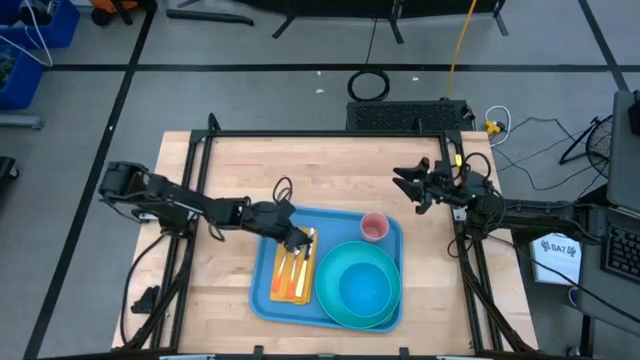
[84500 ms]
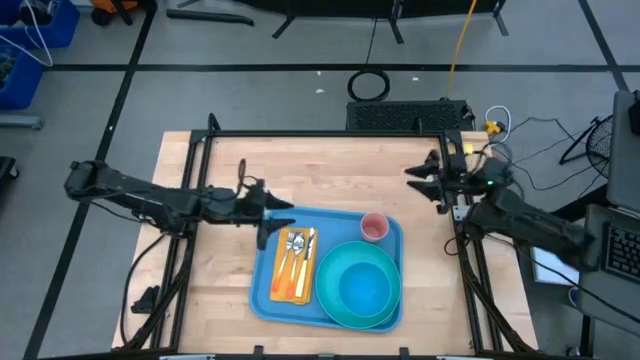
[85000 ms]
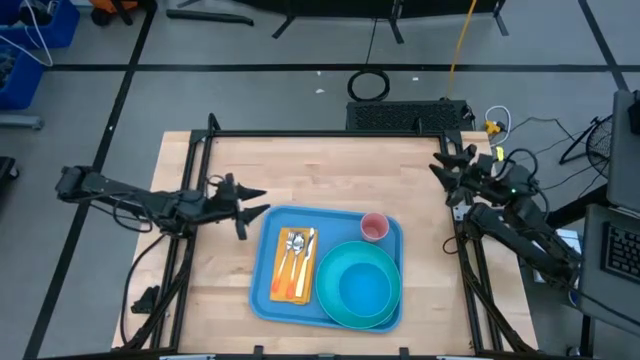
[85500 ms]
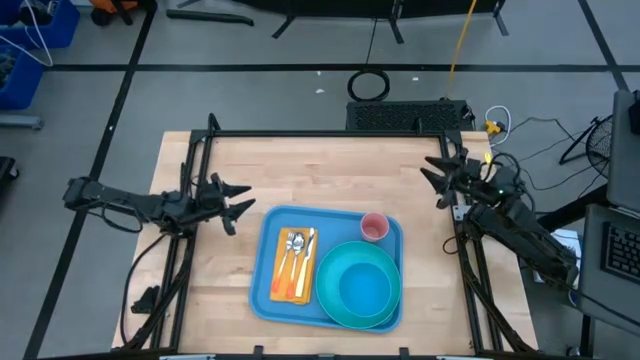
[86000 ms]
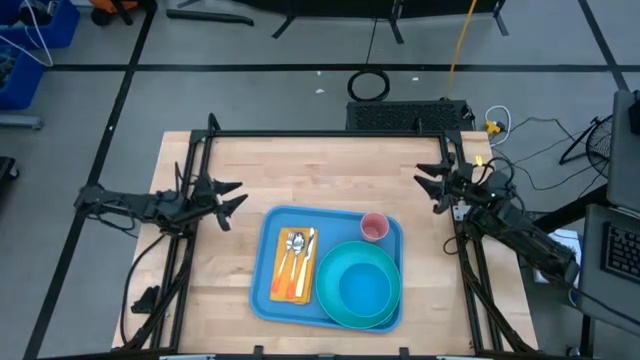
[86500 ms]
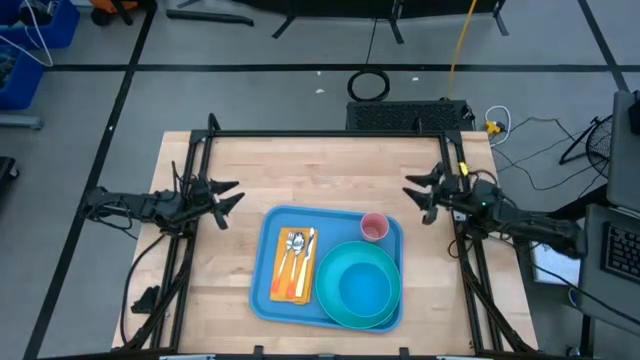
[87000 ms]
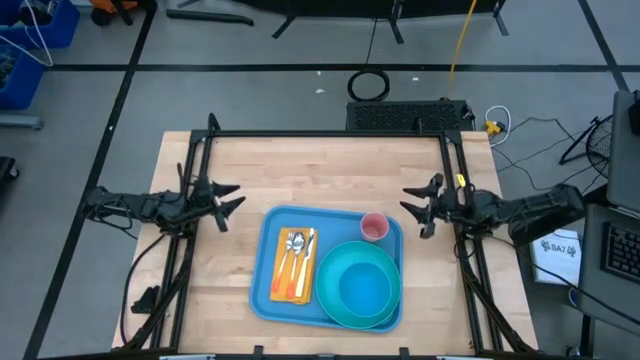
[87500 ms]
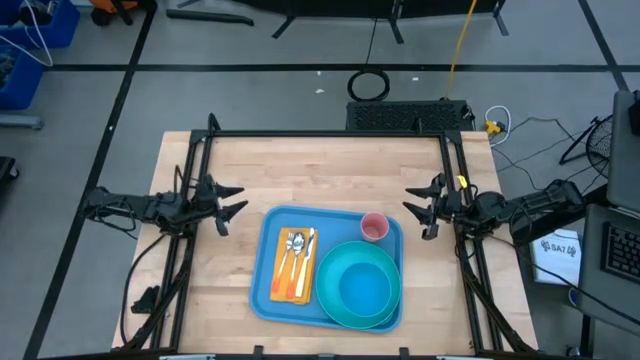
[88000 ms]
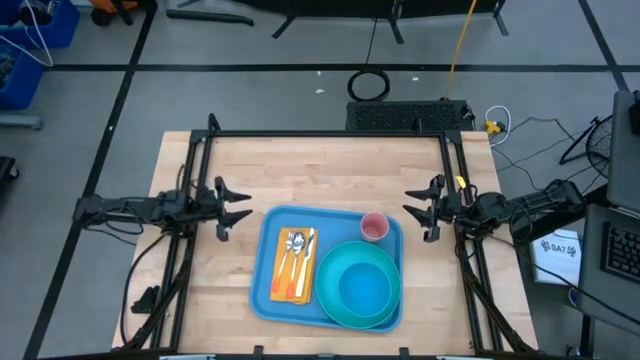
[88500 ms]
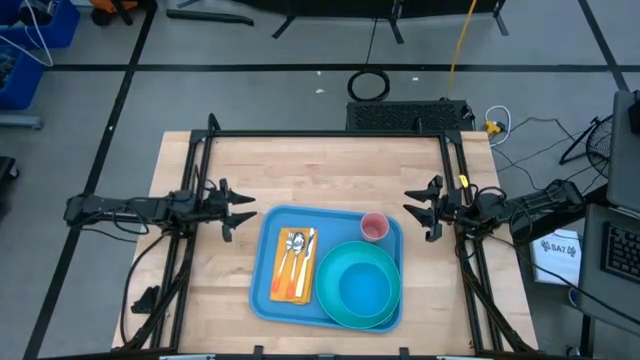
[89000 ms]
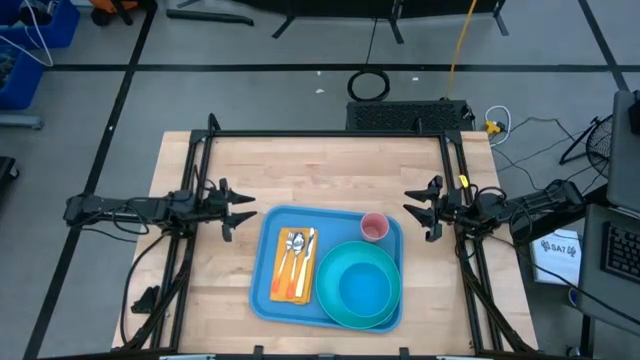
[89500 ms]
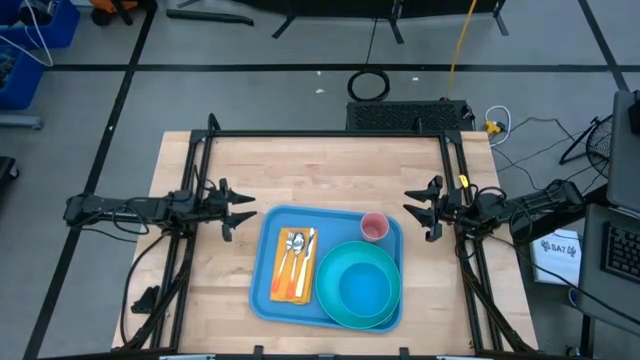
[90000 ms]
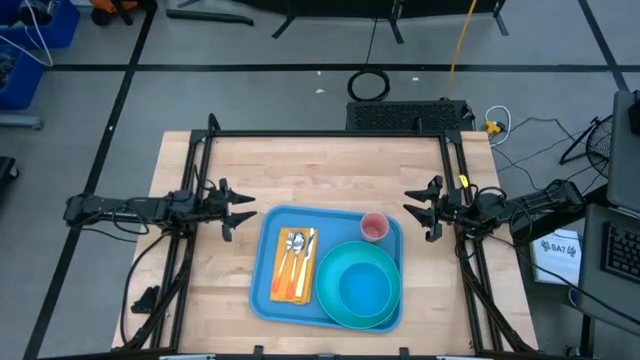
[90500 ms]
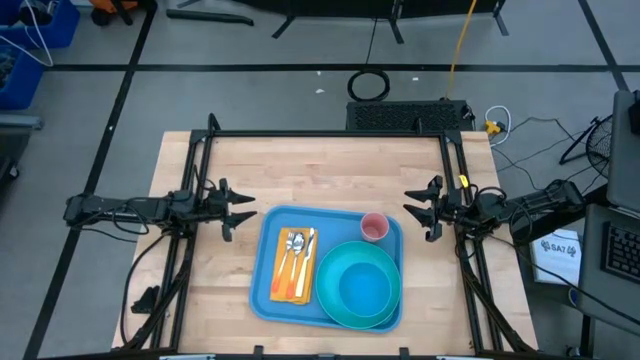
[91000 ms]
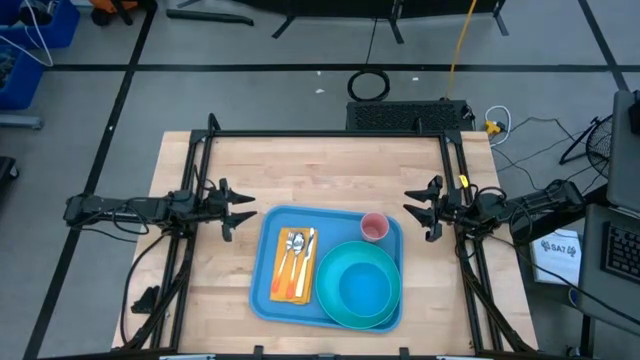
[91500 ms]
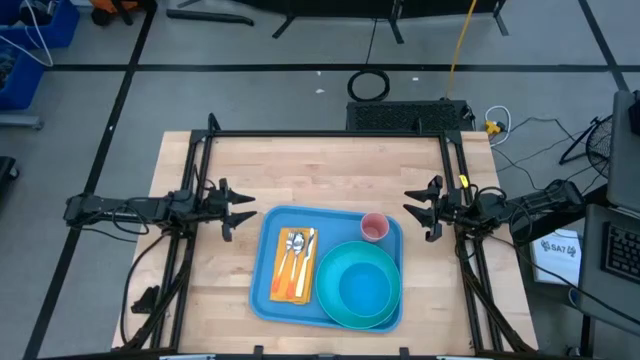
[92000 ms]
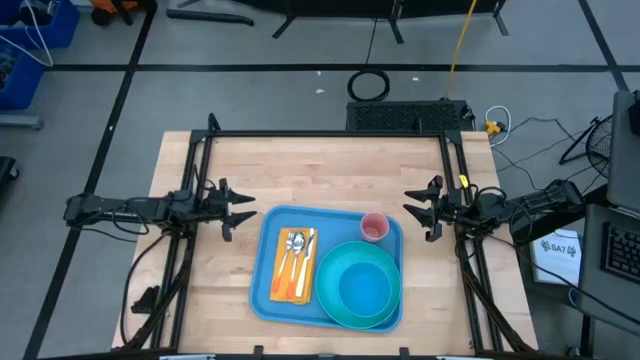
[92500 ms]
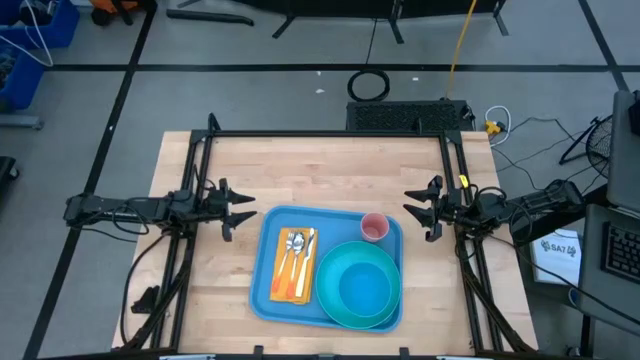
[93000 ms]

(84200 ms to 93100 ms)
Task: Set up tray
Return to Home Position

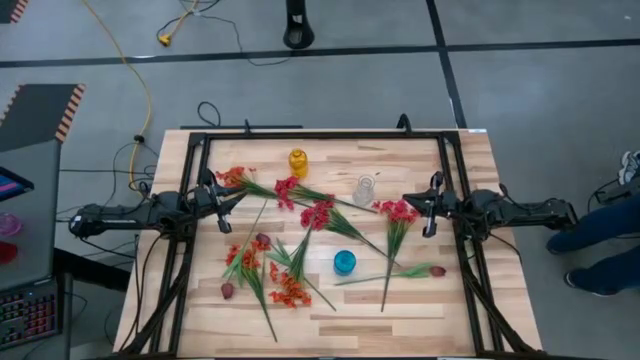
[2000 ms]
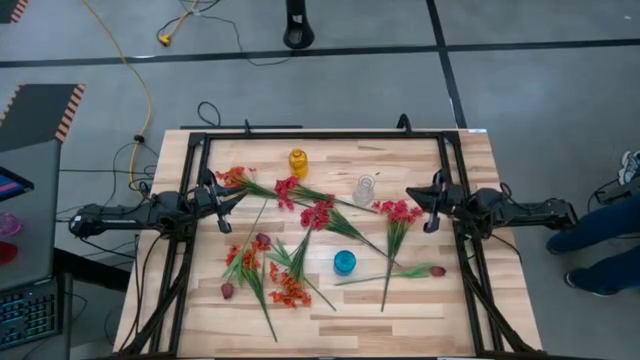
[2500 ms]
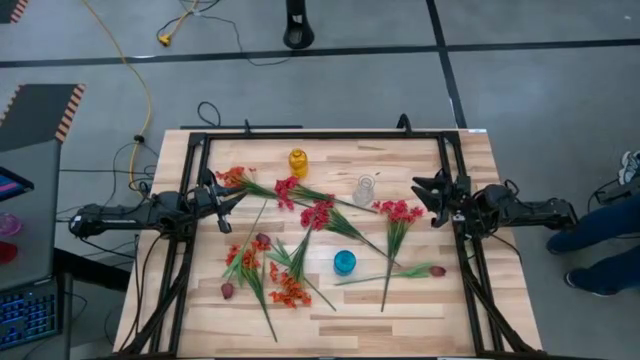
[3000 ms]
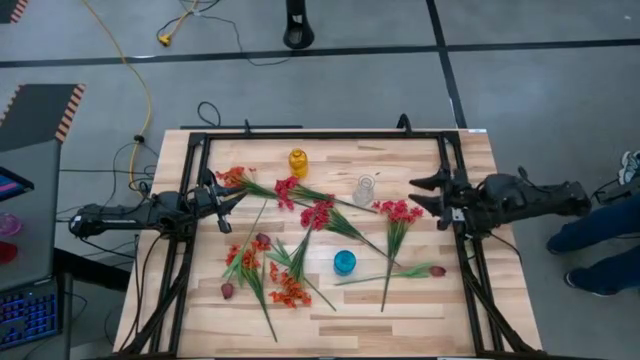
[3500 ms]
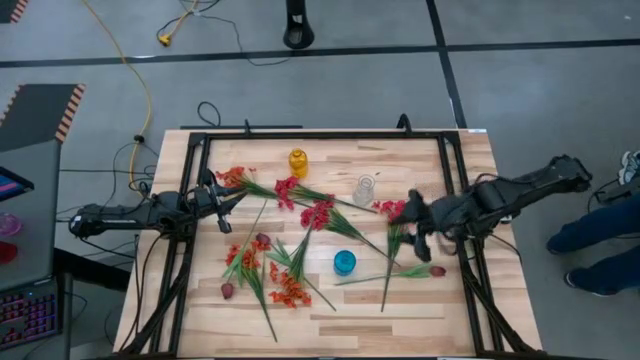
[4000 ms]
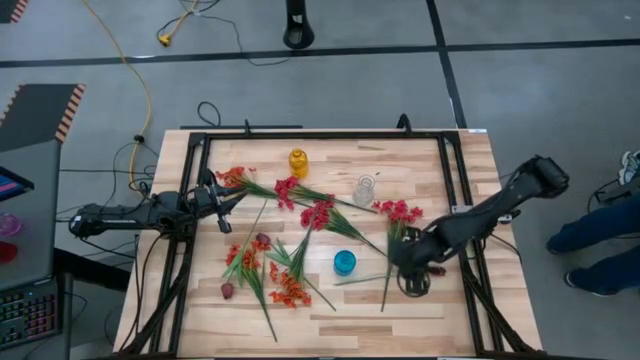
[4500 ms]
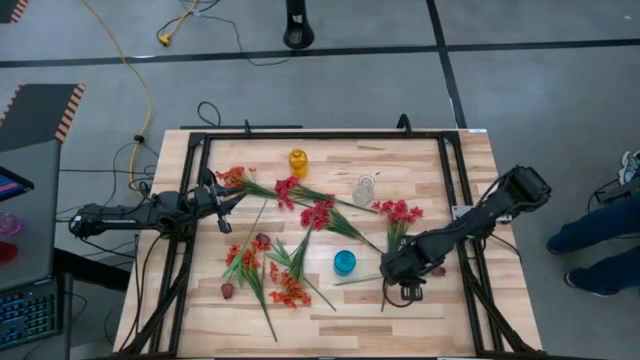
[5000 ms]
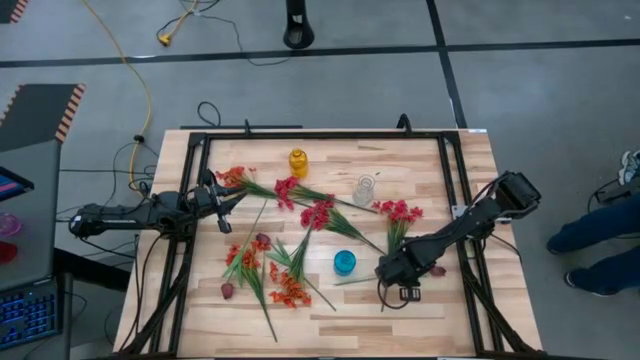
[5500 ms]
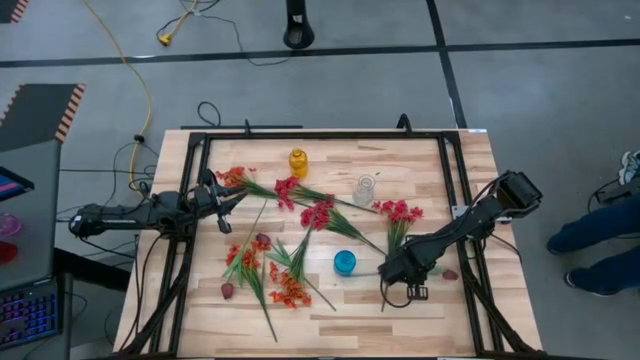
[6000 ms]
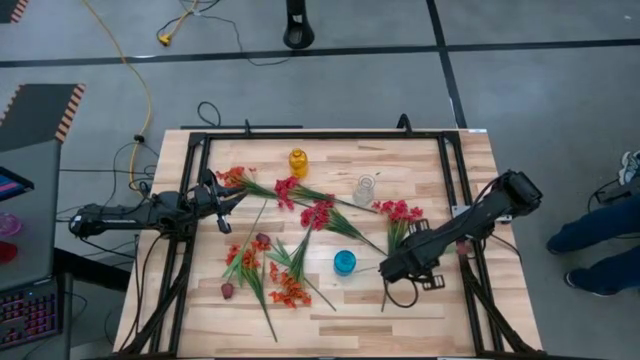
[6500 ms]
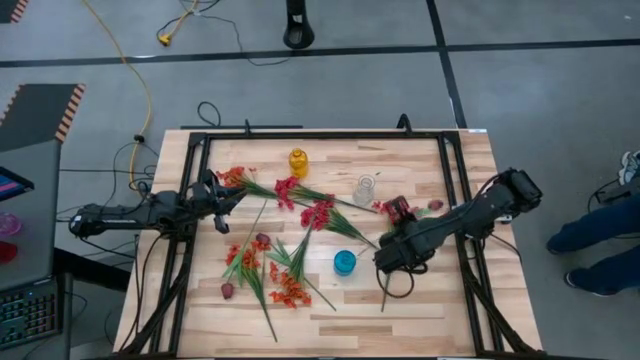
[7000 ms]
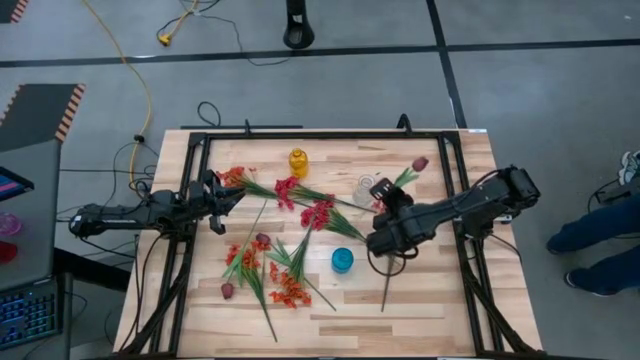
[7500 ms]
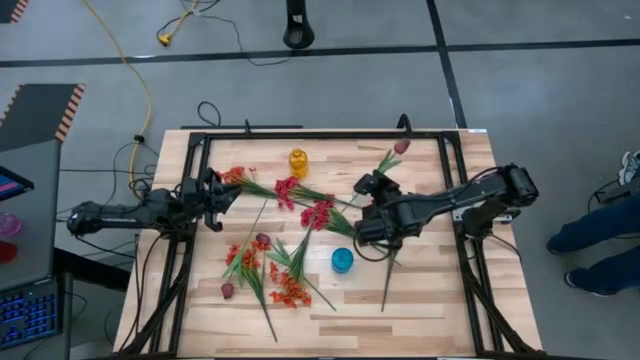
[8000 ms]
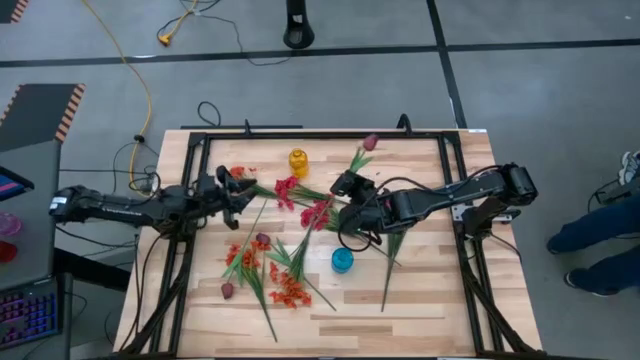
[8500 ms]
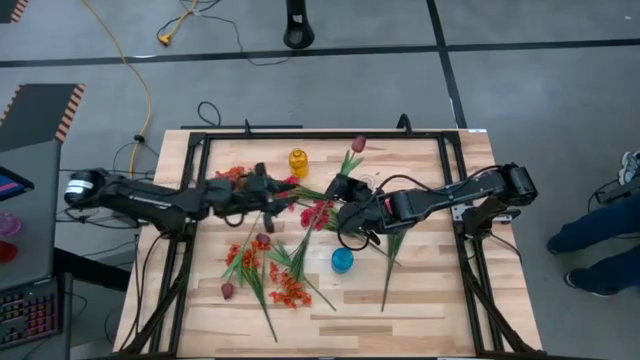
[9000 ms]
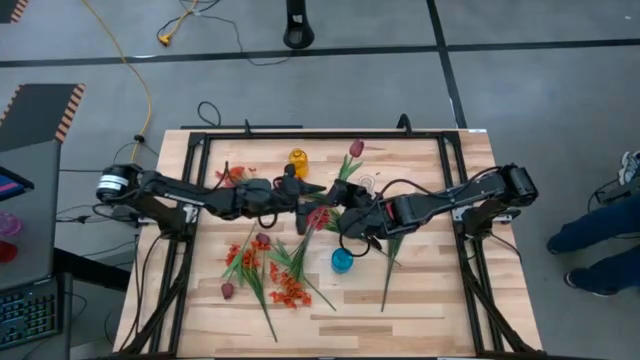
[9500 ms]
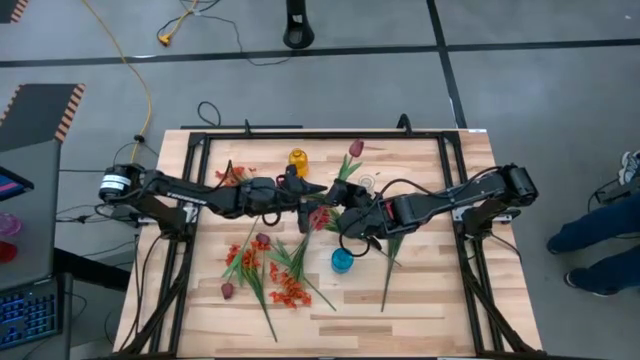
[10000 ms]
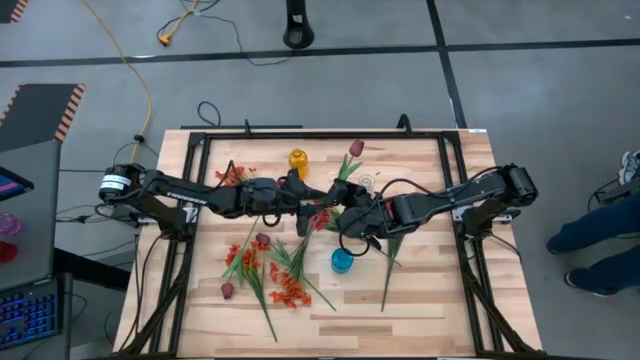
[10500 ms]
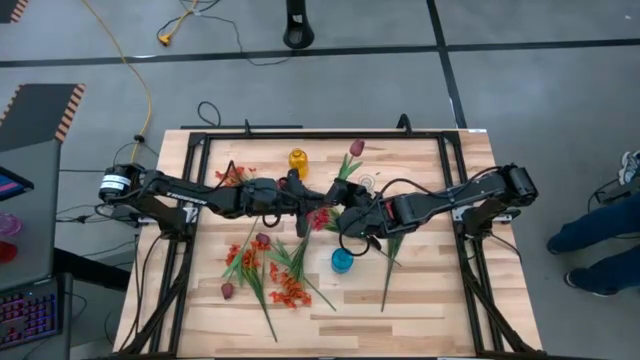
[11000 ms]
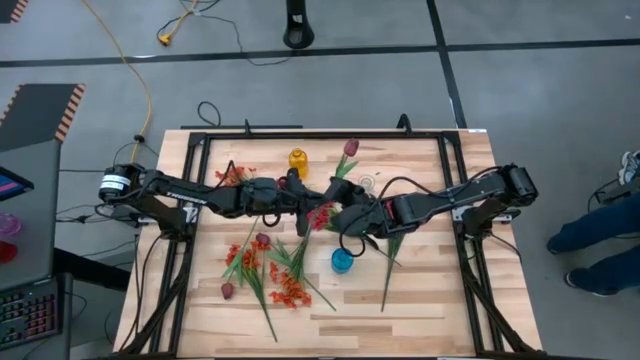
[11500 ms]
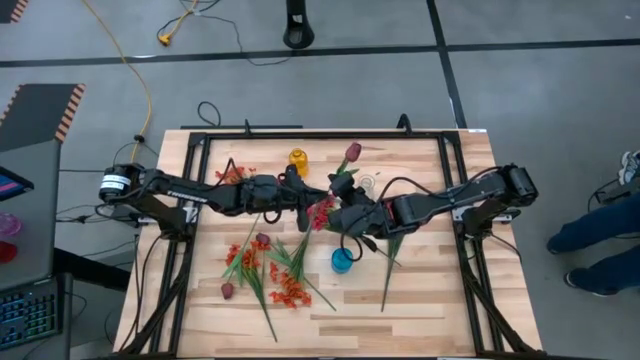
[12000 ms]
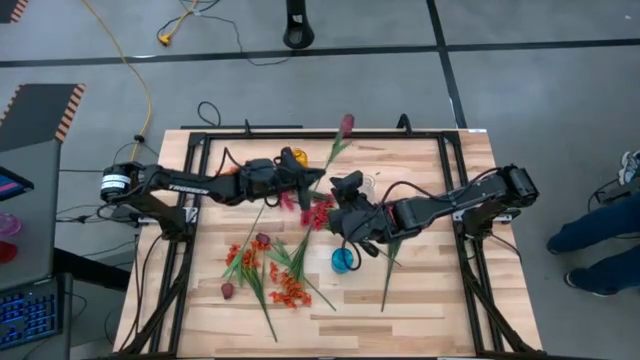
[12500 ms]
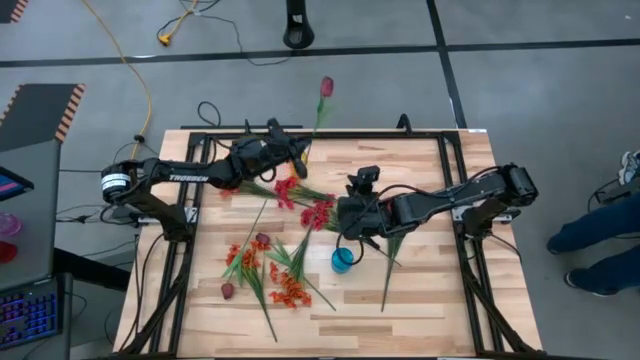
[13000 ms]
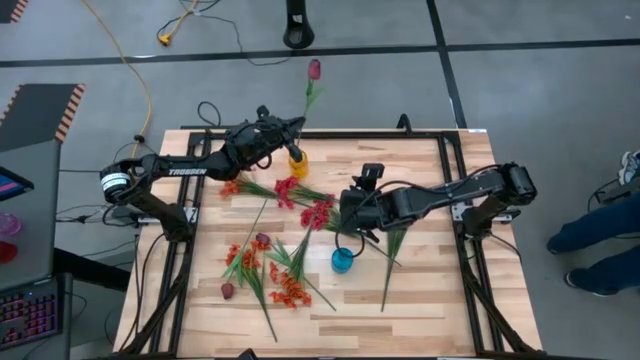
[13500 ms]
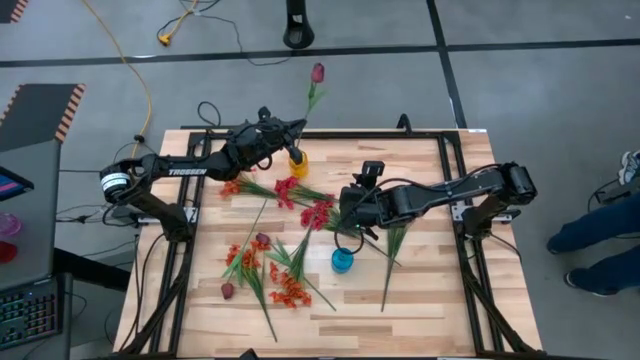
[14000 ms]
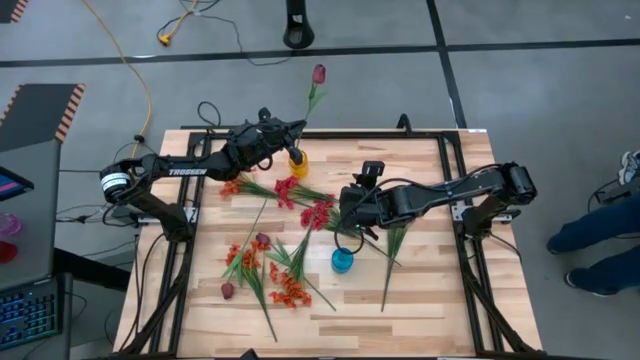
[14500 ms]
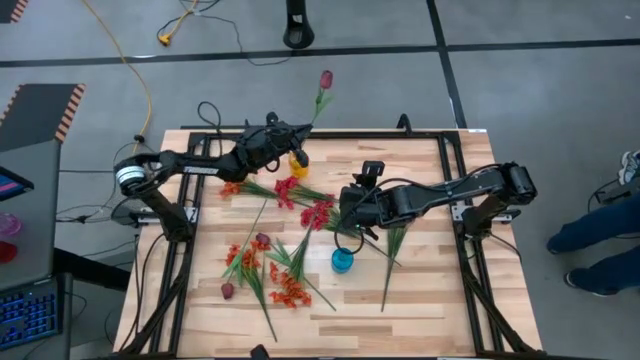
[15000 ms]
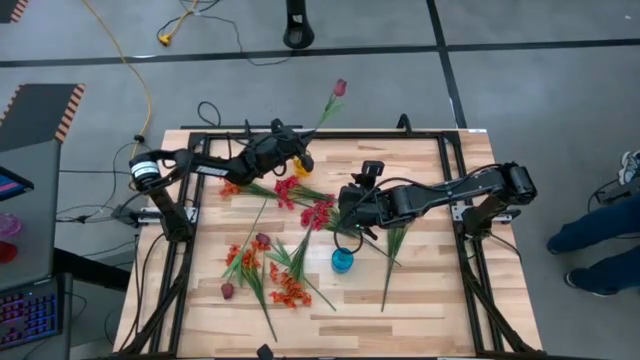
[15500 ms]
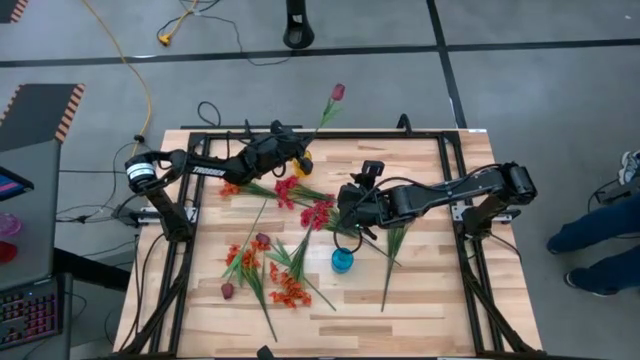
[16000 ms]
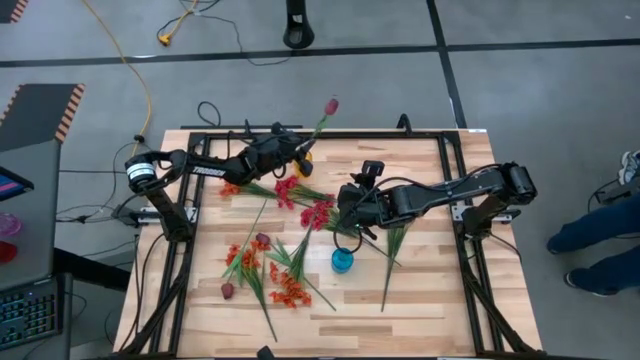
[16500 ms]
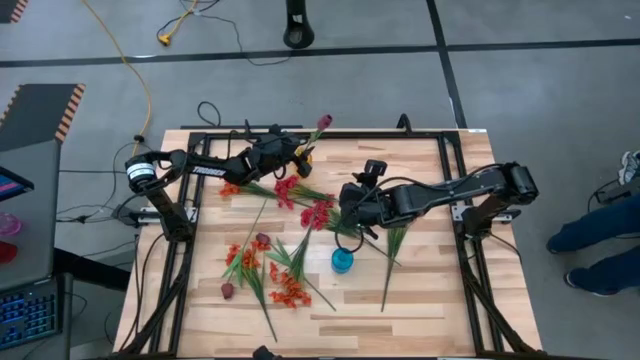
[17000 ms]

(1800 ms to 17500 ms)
Task: Sort flowers into vase by color
Put the right dark red flower into the yellow vase
